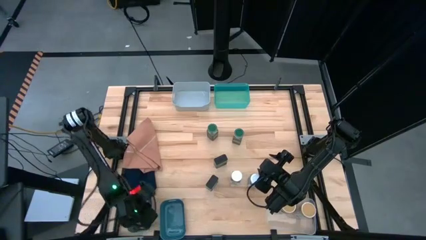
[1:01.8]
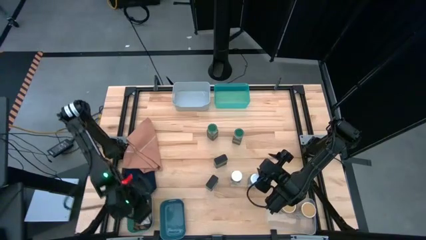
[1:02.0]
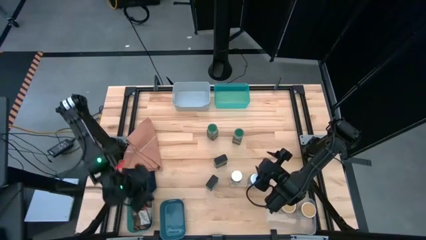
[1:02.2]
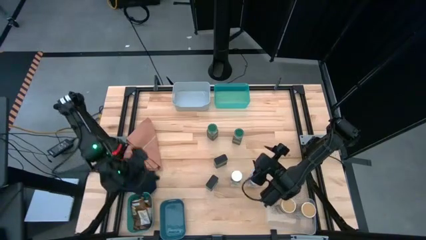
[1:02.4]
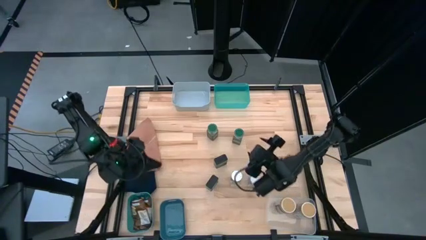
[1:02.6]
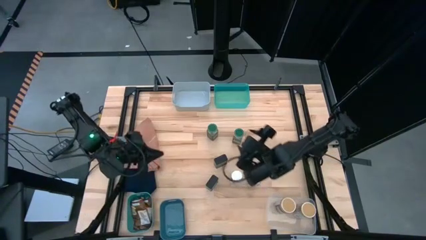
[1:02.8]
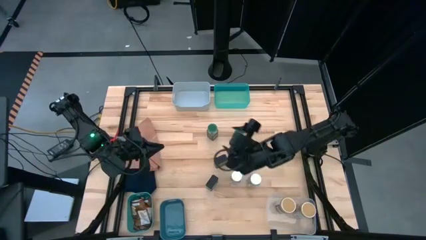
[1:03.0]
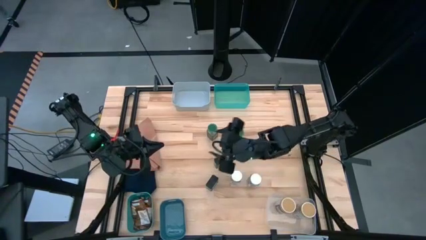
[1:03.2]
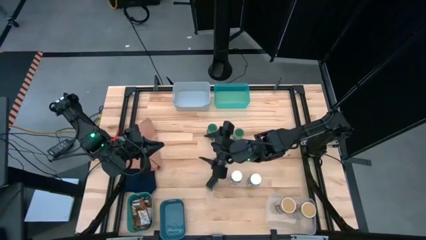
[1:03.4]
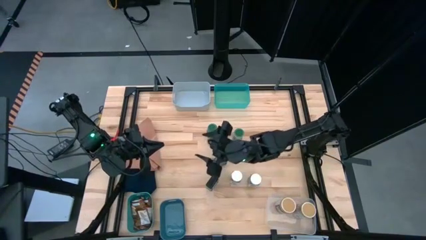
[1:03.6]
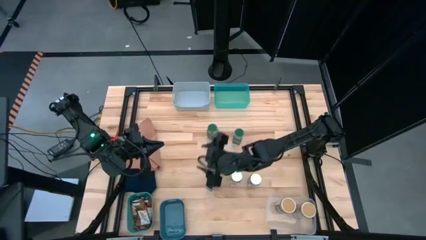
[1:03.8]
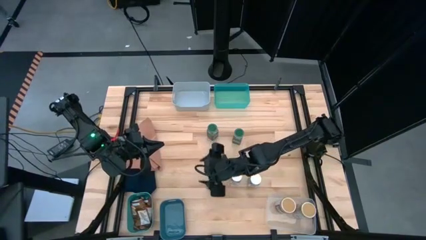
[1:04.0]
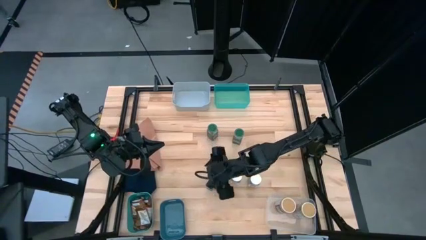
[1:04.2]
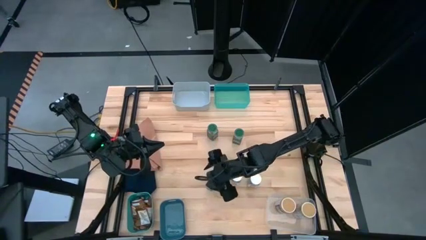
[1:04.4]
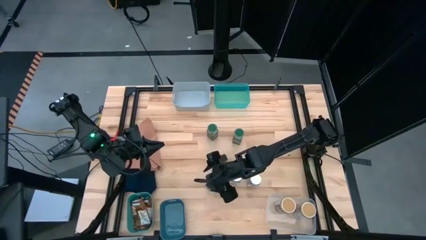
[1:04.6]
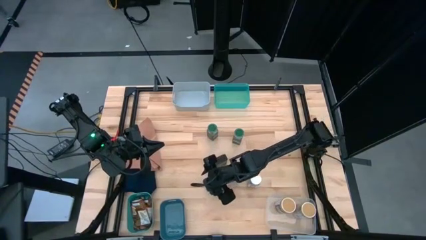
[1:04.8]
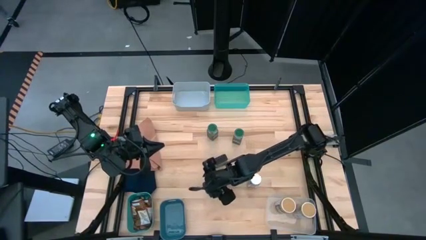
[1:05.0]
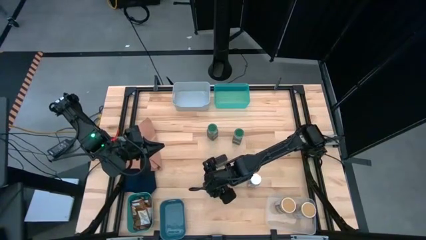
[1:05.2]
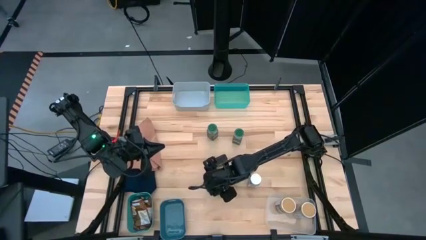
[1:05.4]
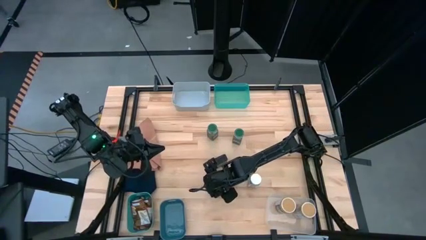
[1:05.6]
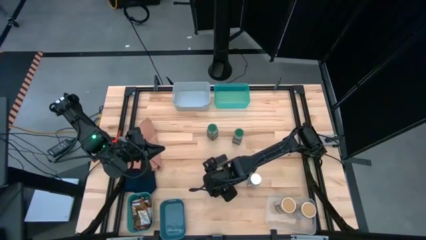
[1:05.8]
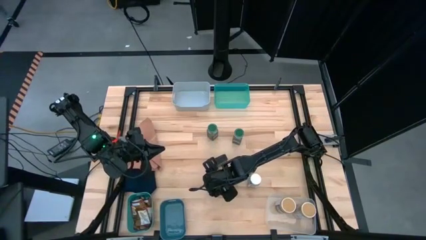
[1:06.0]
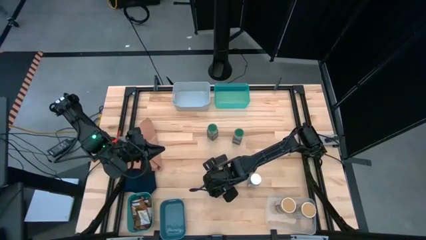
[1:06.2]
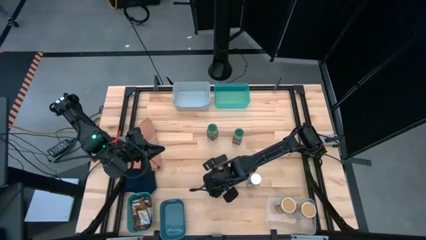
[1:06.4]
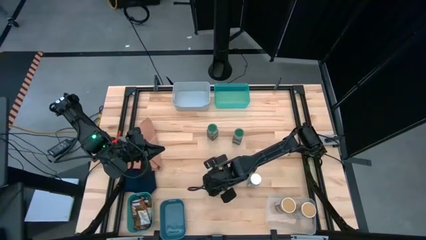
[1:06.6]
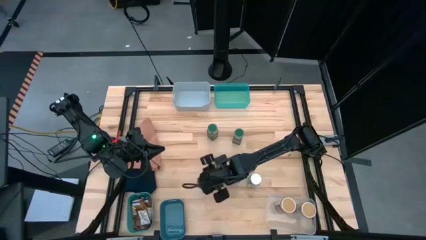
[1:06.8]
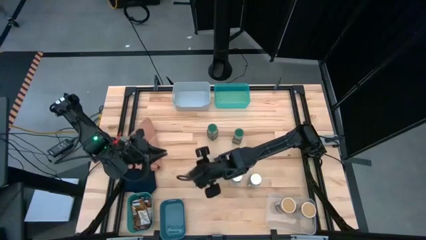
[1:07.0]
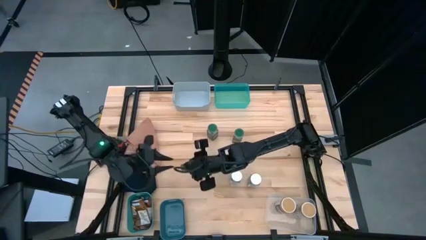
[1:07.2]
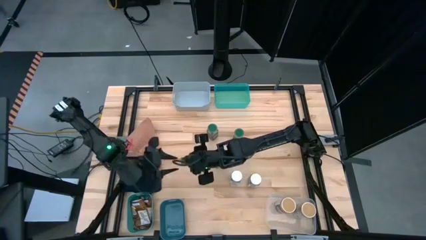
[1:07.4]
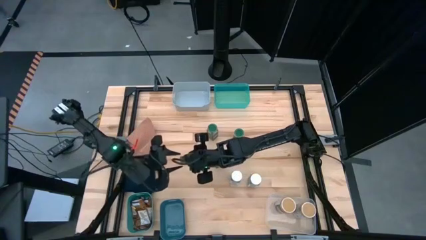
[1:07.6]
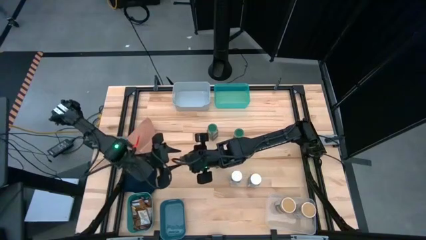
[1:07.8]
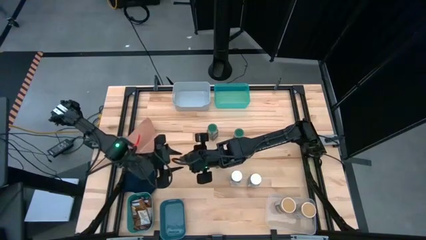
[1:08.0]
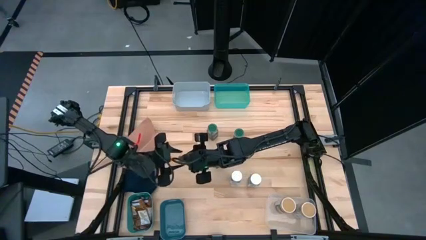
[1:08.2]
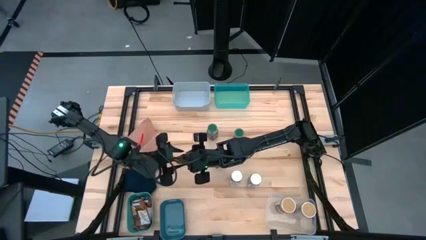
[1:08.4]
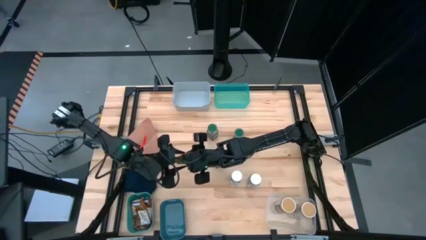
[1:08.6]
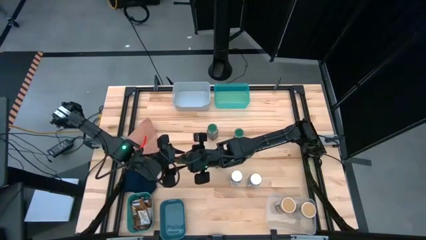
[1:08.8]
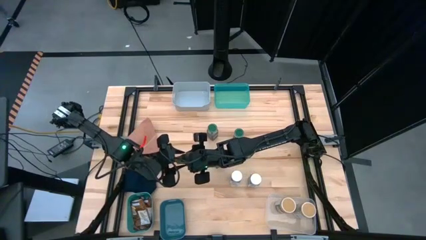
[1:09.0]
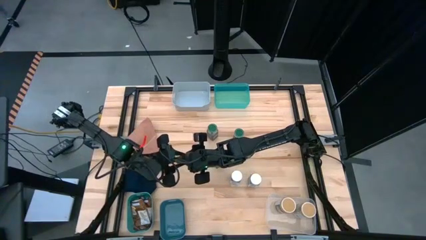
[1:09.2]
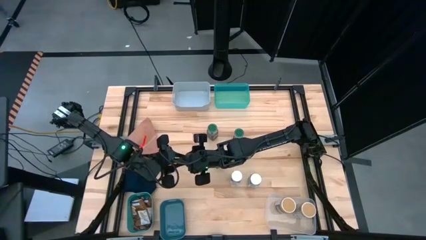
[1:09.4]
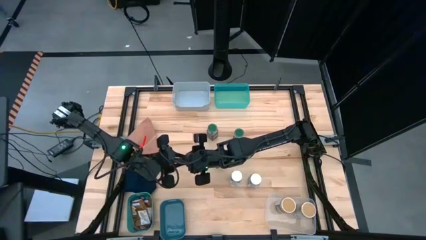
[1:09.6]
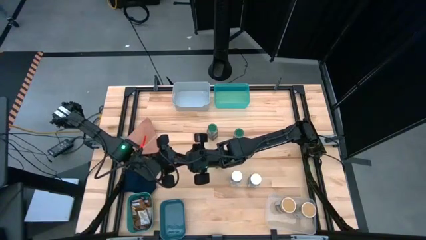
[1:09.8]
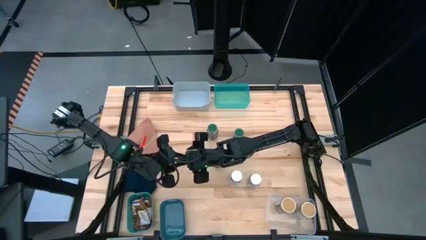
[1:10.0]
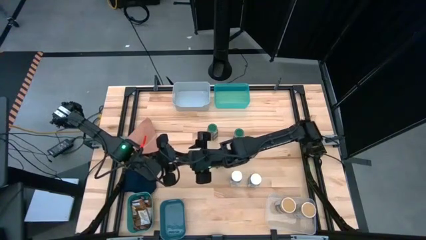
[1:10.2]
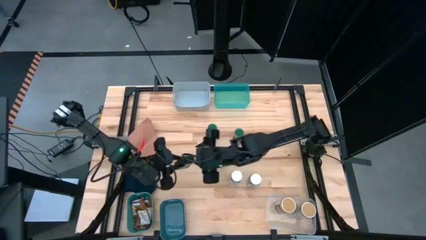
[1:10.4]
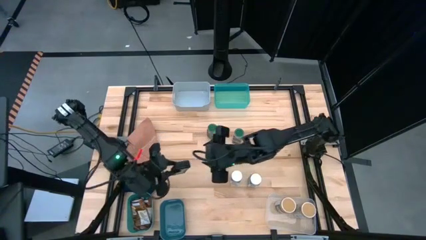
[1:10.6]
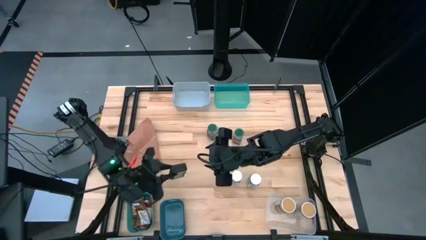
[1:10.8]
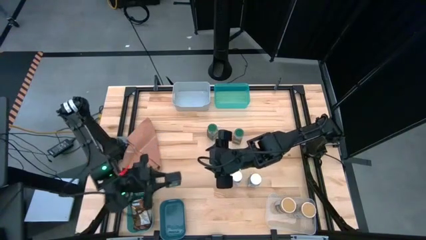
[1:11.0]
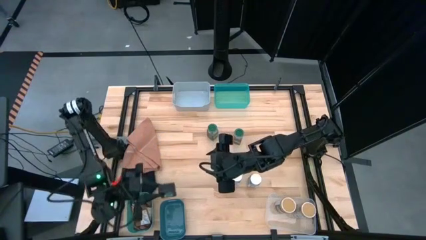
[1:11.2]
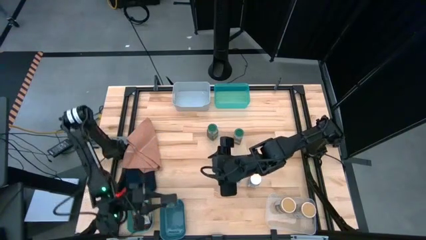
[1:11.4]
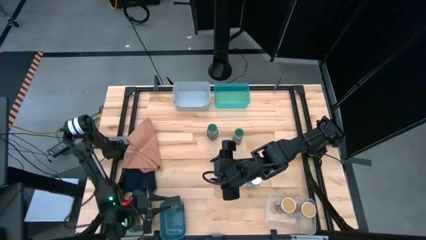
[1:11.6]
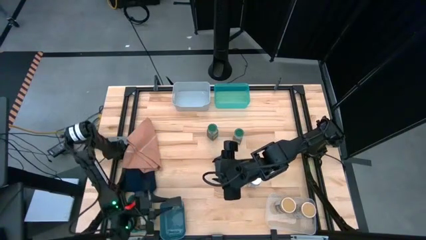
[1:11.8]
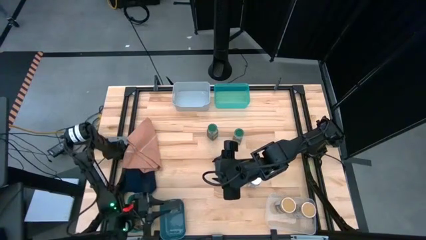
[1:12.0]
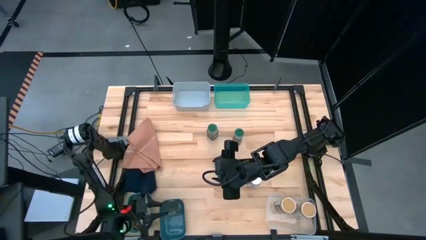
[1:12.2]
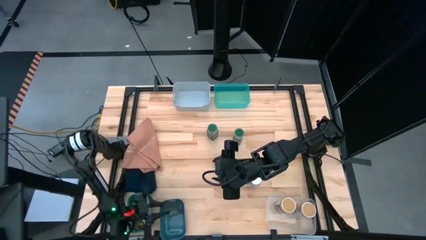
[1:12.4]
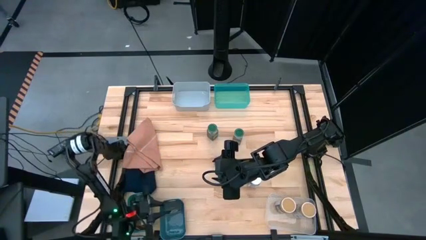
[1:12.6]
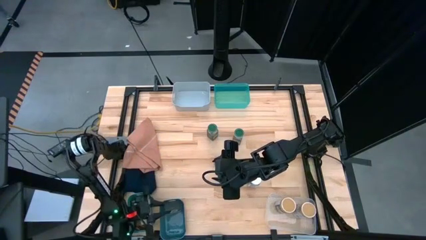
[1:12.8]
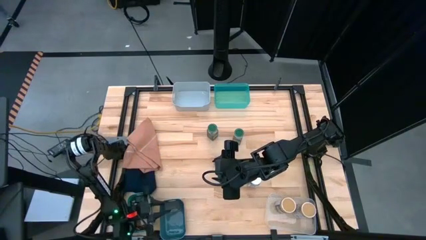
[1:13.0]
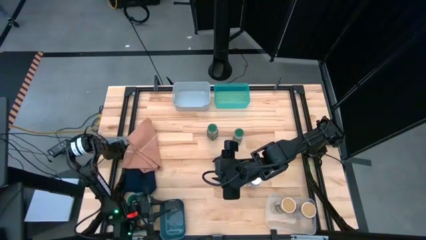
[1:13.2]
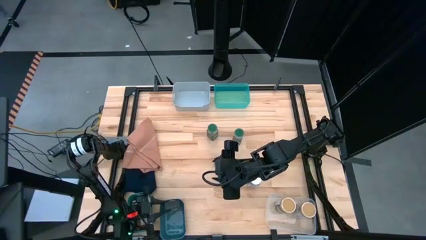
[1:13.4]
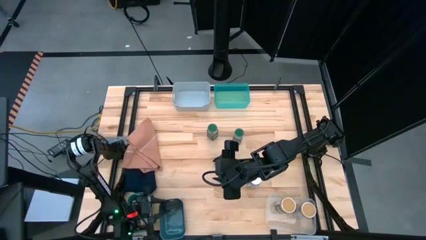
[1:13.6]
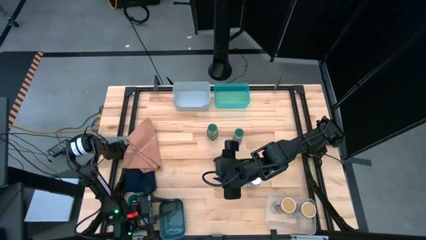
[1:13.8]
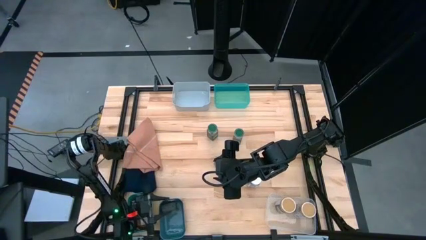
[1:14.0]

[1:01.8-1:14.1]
Task: Sort spices by type
Put the bottom black spice can into the blue bin

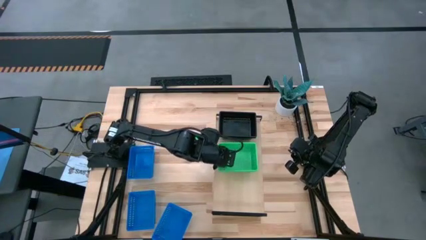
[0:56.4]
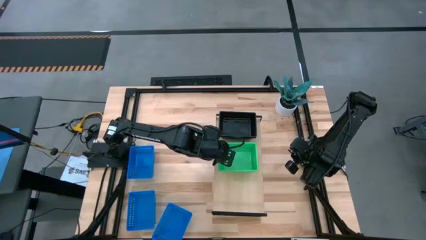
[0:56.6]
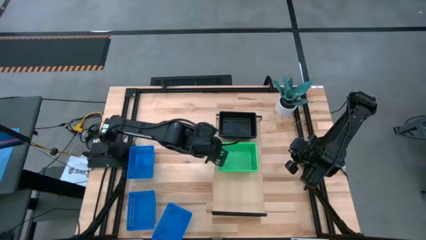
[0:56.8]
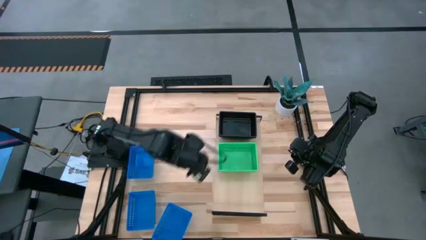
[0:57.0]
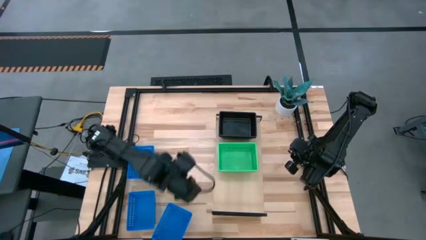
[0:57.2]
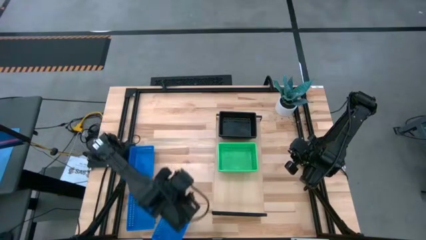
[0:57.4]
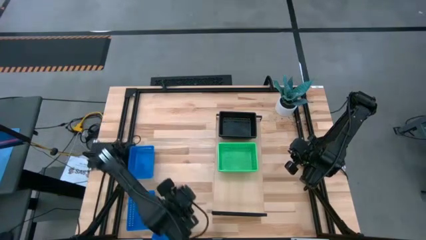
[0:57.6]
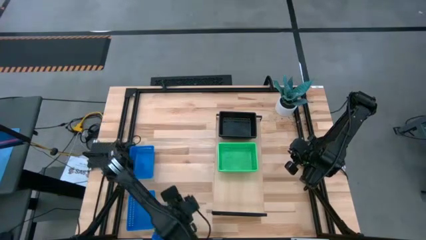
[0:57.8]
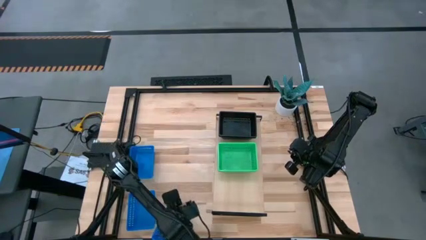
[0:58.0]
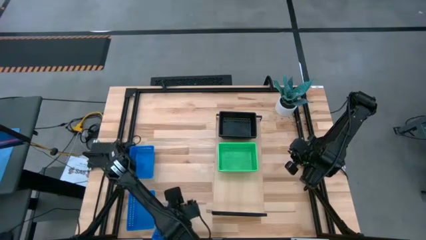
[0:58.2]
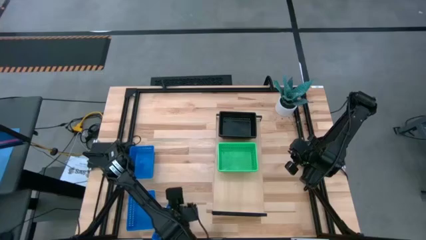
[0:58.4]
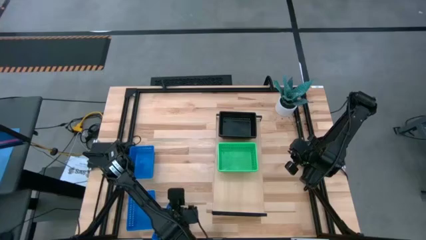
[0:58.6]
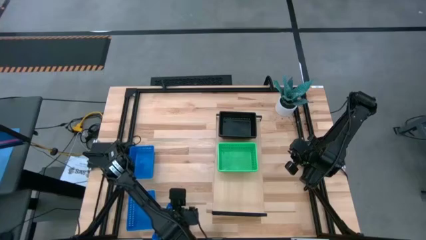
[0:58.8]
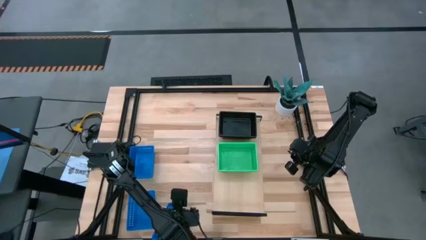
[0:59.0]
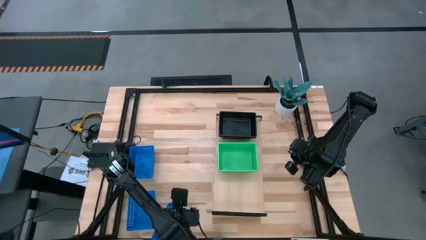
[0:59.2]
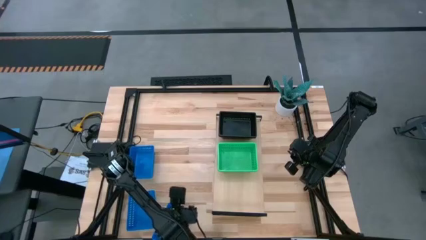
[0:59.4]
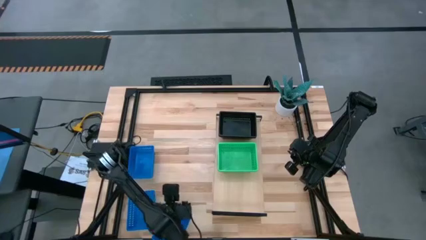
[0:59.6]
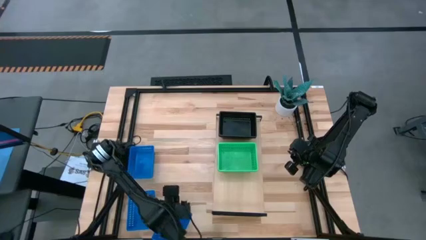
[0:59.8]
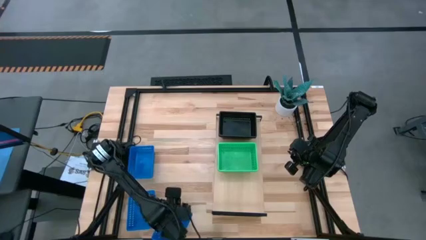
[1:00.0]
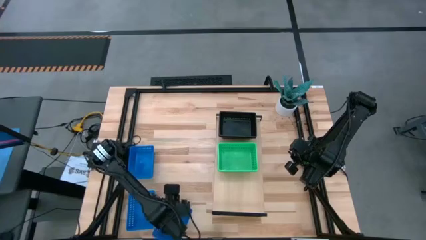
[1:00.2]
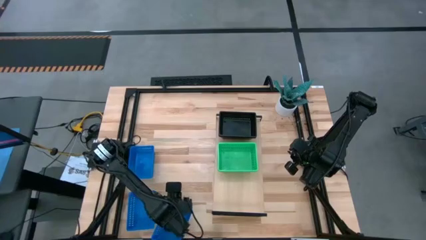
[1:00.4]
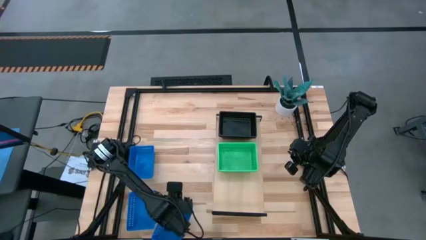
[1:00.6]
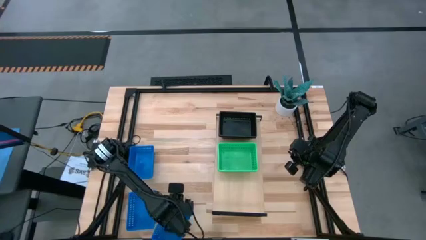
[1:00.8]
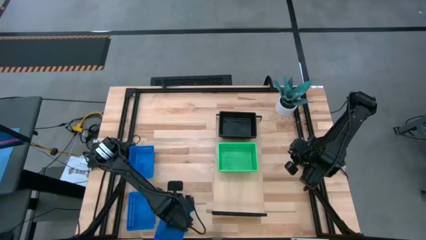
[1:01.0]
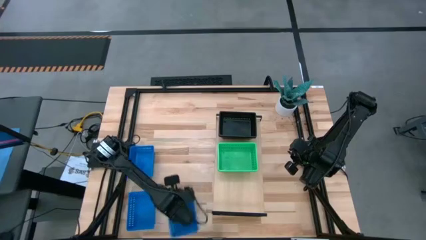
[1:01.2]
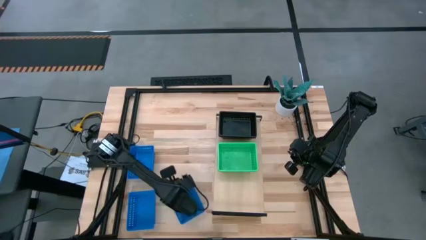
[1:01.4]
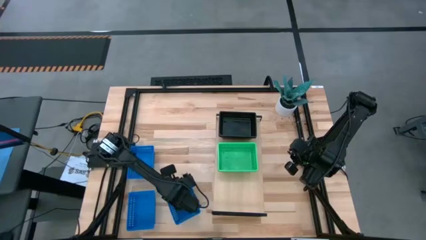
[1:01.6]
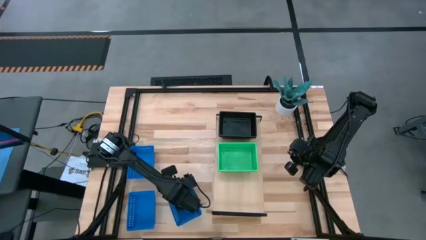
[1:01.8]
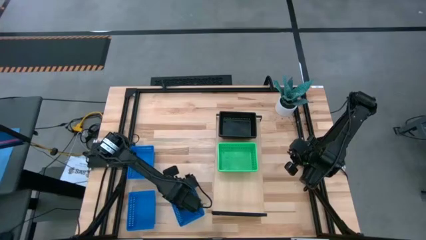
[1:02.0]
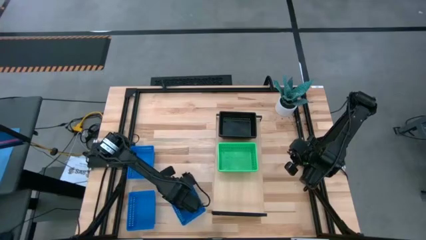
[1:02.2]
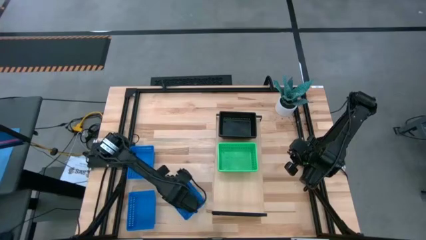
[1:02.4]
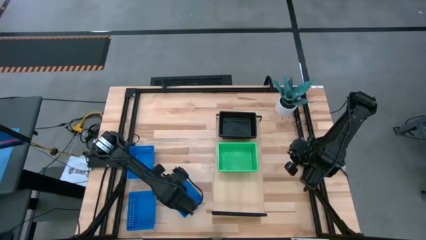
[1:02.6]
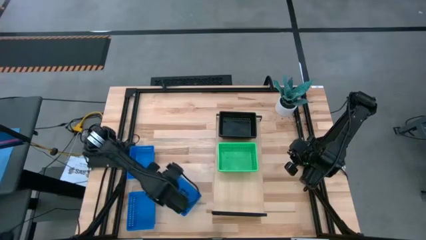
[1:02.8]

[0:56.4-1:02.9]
Task: Stack baskets on shelf by color
Put the bottom right blue bin on the shelf
